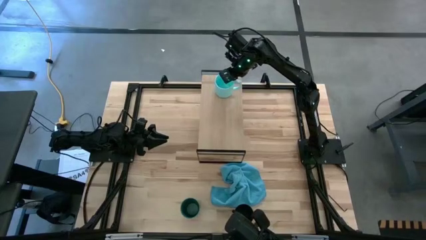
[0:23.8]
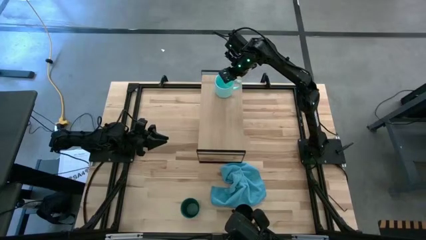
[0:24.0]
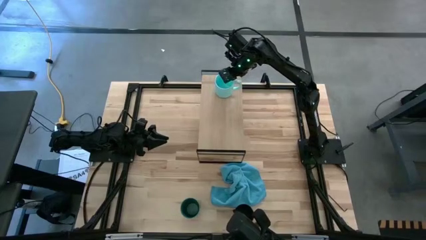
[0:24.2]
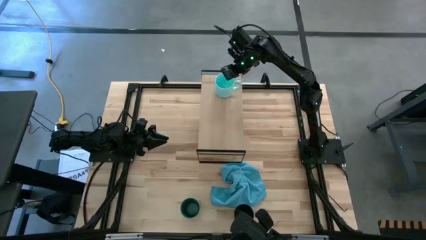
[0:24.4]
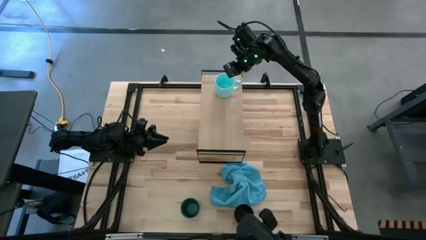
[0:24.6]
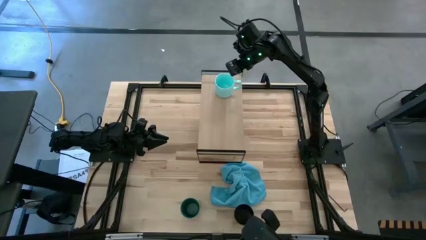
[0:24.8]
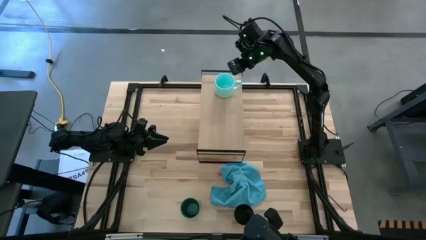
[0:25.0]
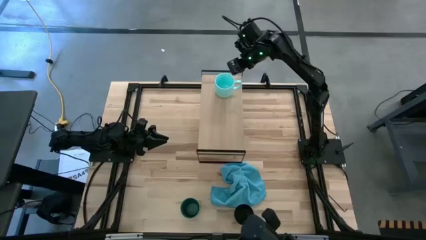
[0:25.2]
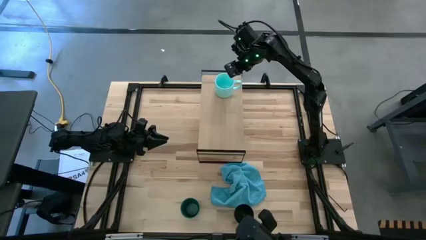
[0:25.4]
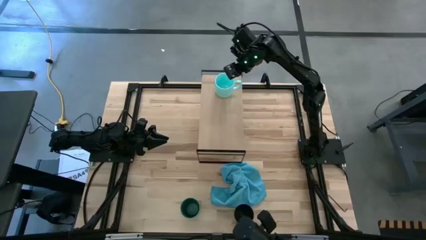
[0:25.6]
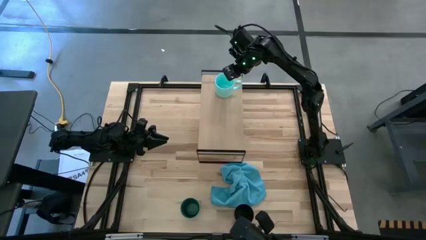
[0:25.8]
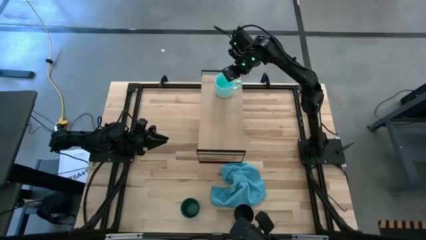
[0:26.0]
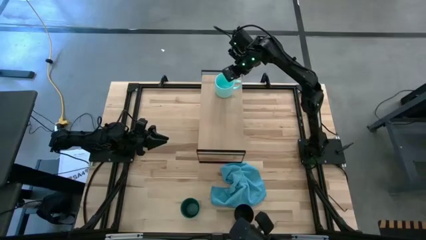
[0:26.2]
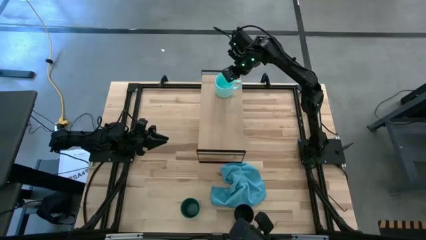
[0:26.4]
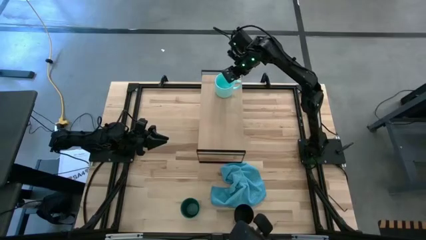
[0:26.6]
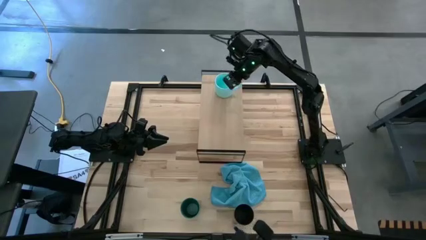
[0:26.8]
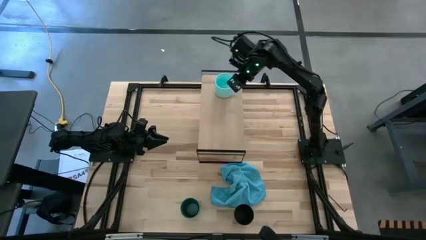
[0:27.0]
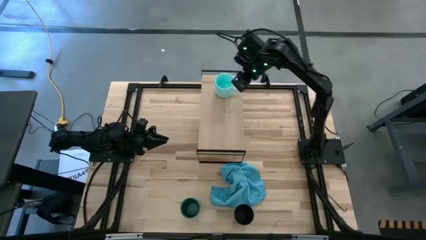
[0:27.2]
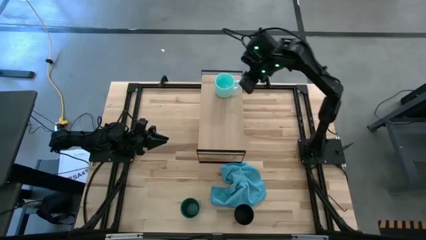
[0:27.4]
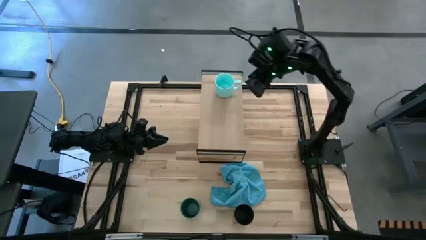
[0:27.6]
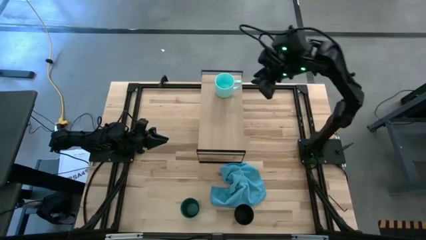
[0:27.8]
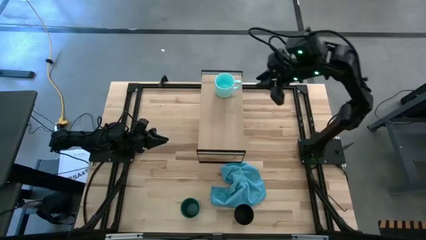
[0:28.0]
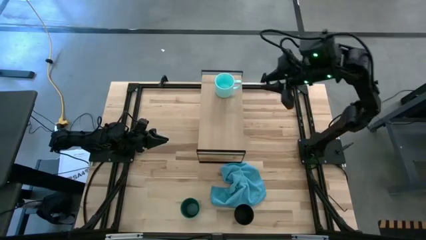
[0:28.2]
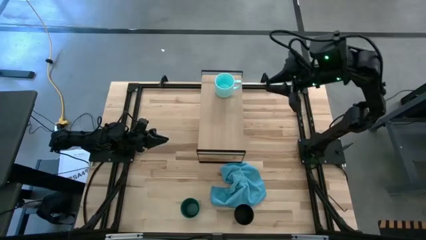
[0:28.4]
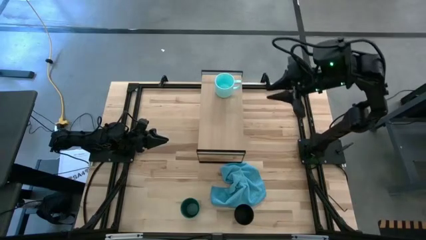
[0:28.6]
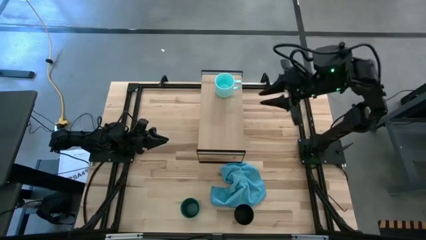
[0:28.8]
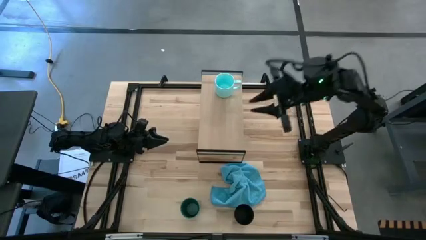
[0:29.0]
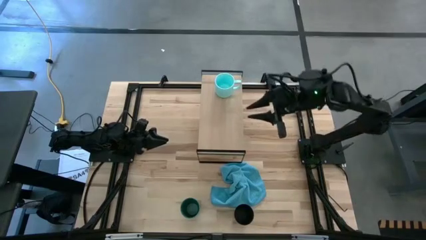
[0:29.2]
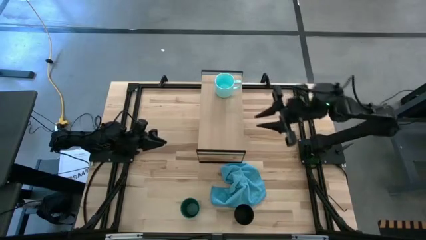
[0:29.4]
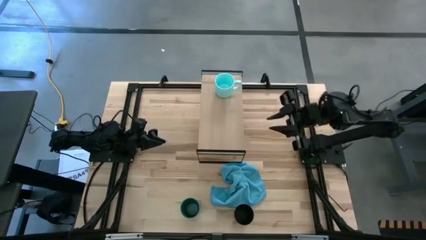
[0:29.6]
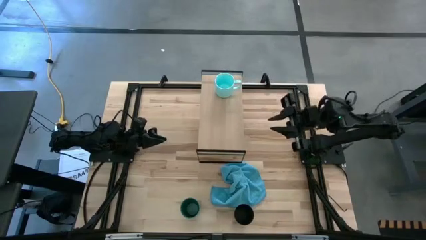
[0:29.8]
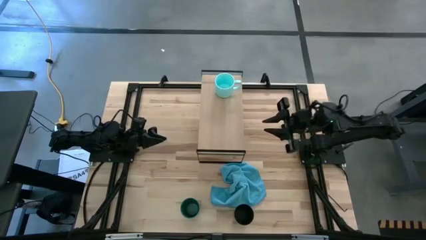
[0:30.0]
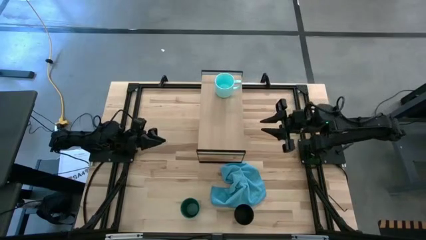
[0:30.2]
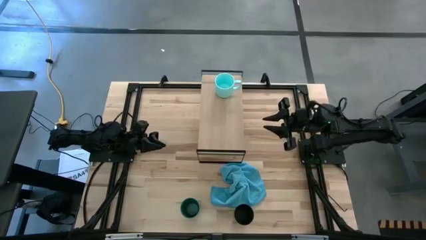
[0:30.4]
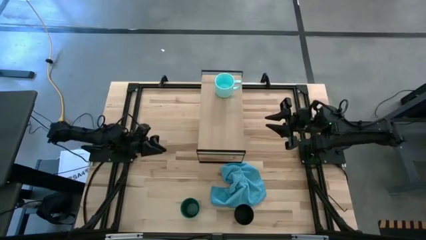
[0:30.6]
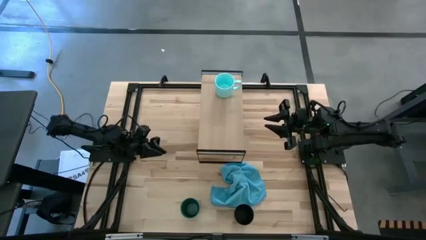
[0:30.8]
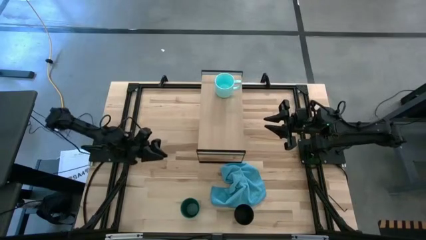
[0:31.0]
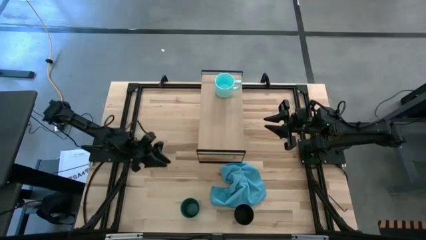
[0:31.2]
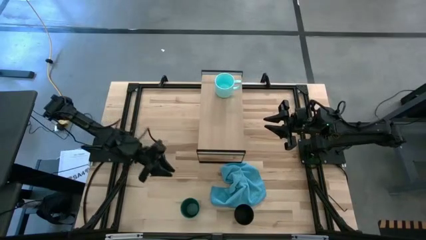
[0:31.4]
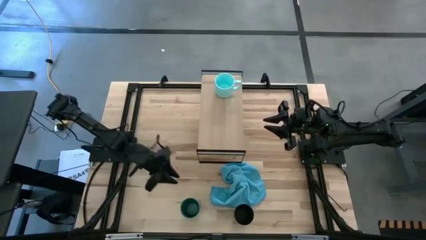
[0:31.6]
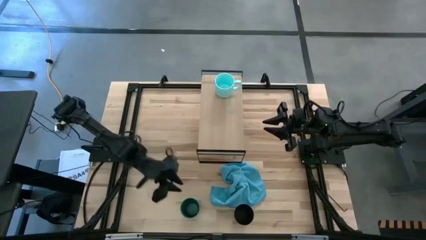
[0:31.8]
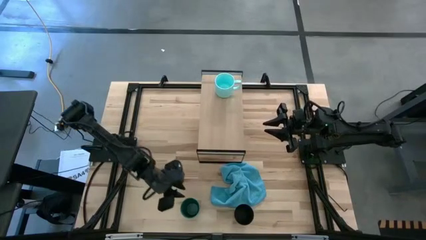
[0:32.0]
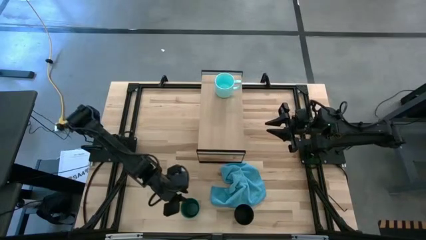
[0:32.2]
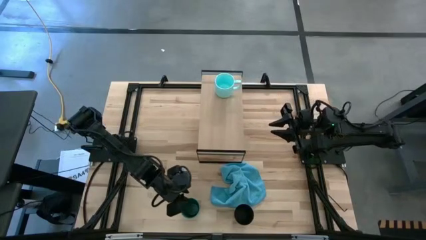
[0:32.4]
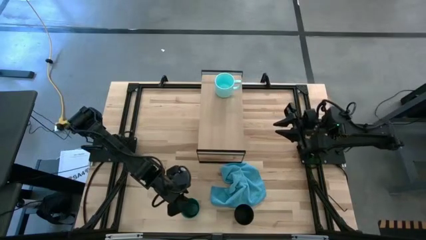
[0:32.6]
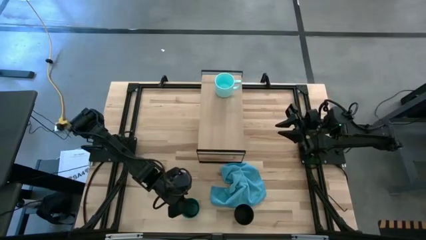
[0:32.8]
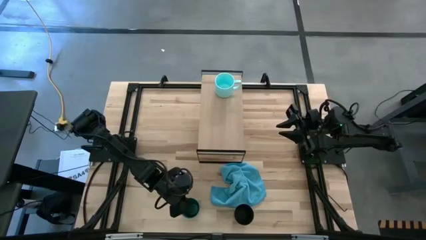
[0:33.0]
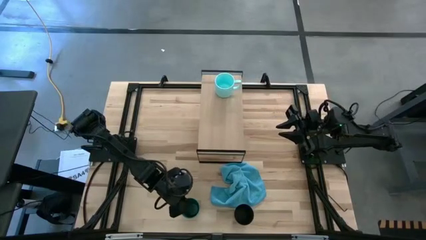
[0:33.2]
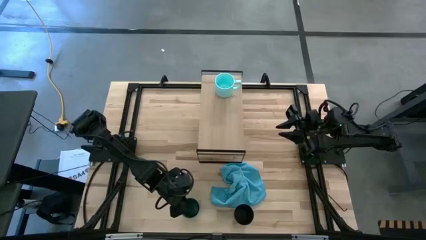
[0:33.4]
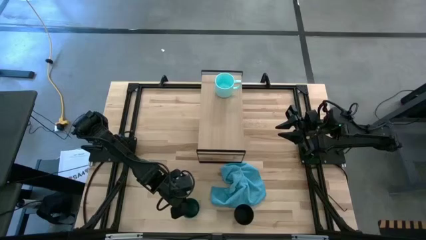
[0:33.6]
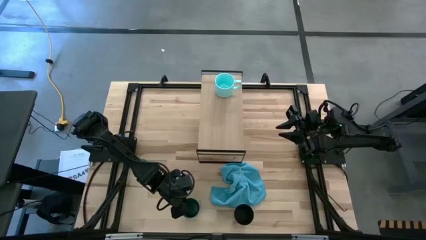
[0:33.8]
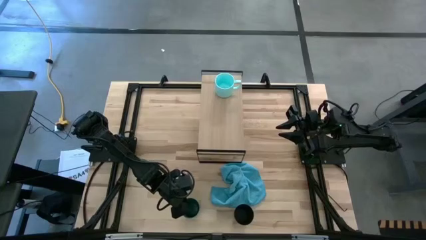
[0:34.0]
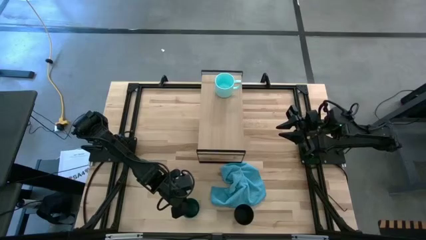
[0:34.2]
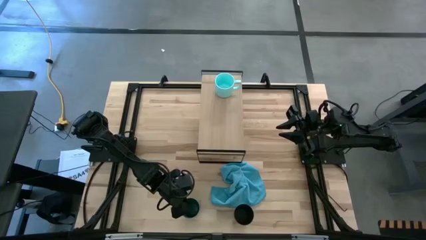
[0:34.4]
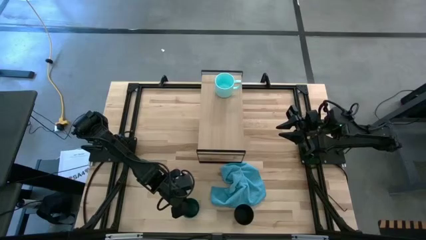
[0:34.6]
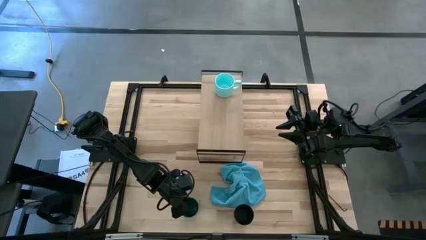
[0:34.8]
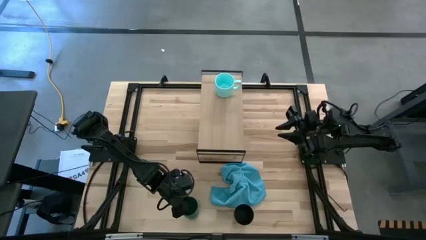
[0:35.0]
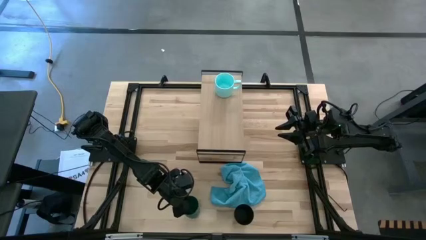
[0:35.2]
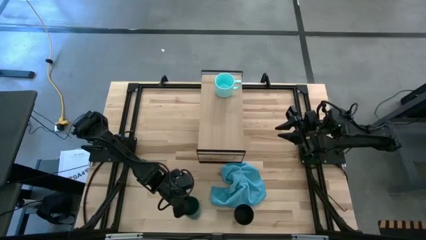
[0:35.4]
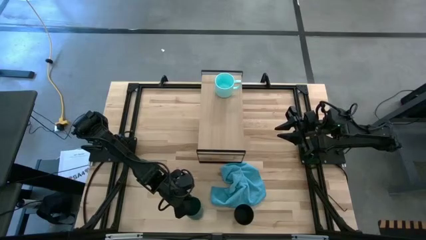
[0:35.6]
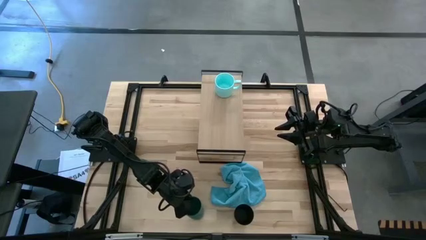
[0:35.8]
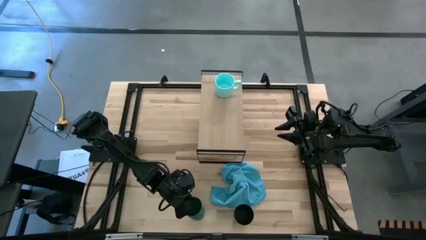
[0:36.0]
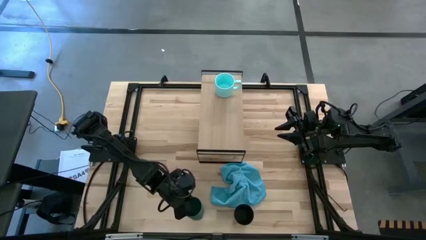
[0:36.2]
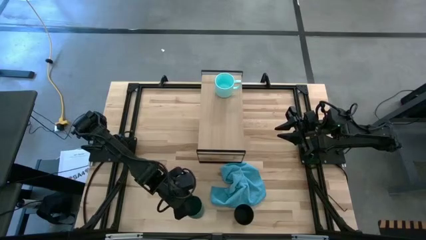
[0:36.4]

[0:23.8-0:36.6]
Task: Stack small to large cups/mugs on shelf
Put the green cup on the shelf
